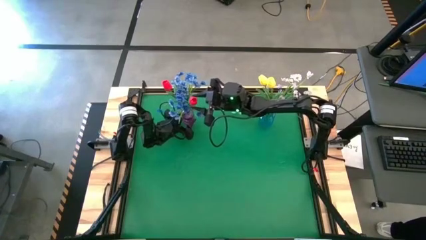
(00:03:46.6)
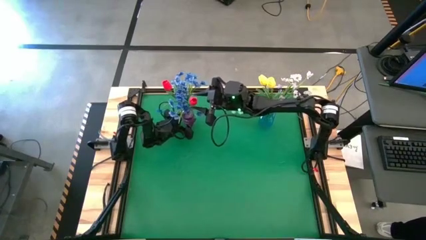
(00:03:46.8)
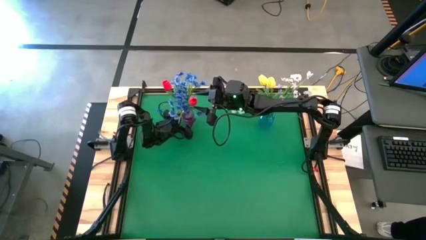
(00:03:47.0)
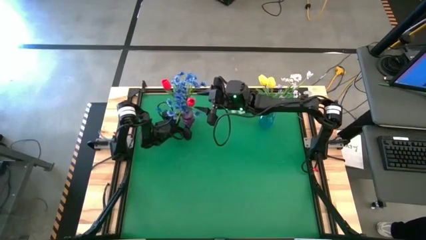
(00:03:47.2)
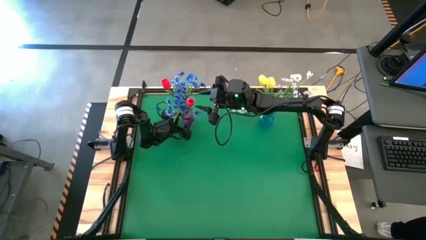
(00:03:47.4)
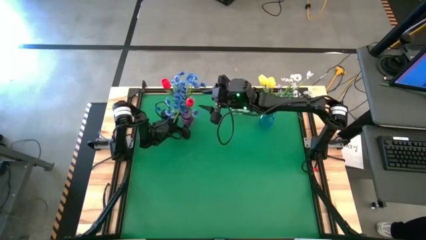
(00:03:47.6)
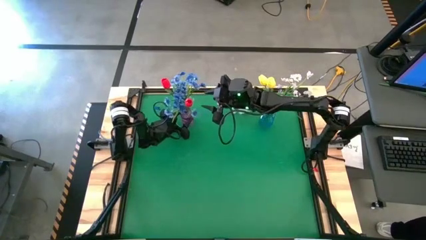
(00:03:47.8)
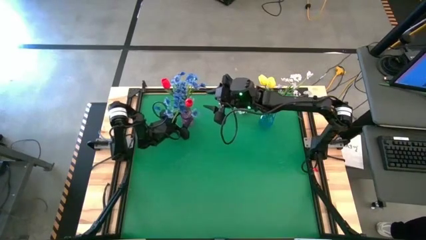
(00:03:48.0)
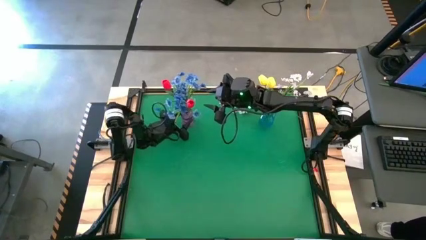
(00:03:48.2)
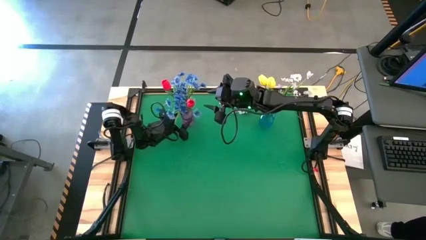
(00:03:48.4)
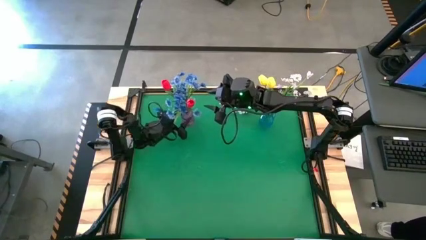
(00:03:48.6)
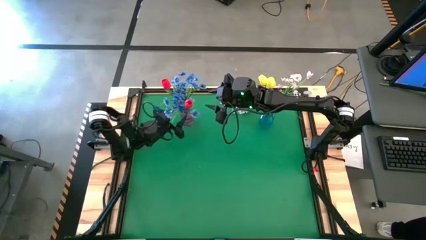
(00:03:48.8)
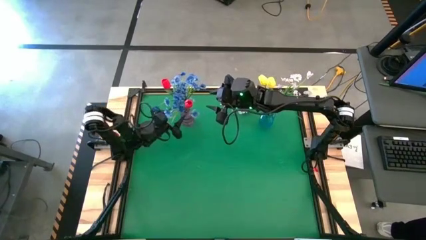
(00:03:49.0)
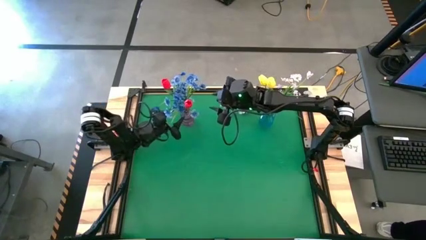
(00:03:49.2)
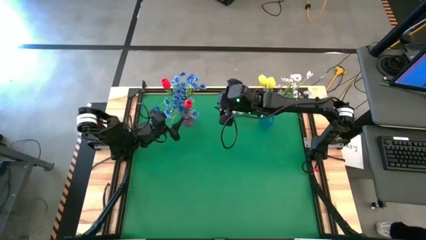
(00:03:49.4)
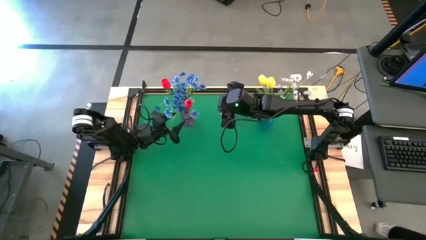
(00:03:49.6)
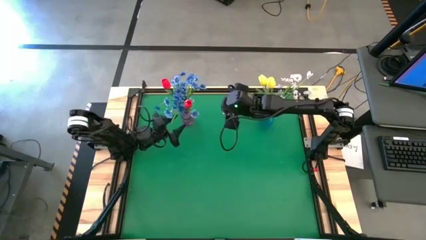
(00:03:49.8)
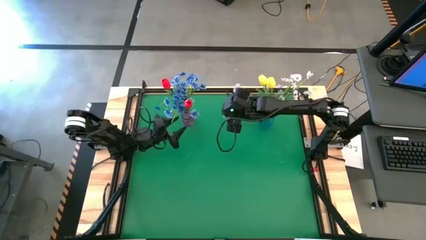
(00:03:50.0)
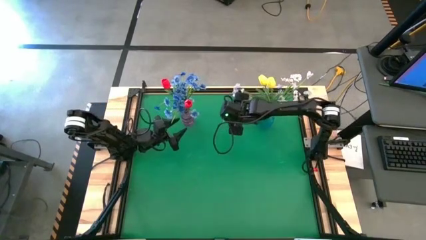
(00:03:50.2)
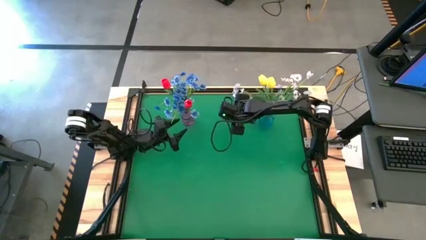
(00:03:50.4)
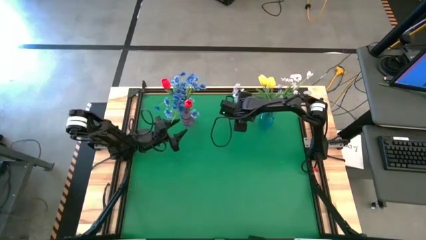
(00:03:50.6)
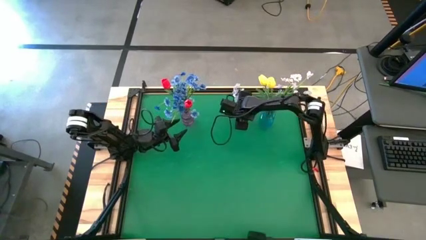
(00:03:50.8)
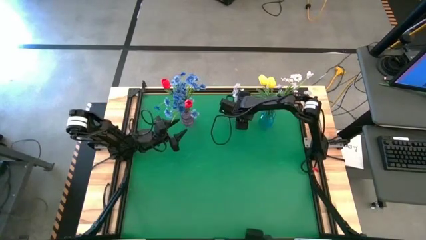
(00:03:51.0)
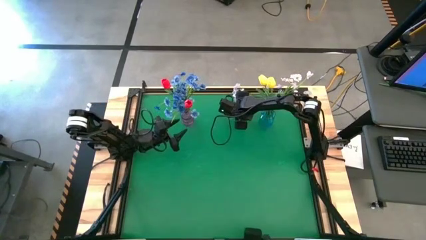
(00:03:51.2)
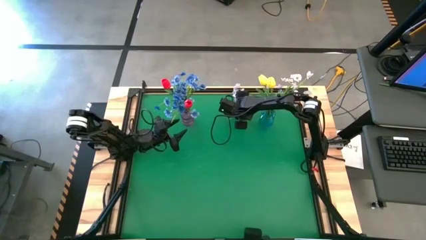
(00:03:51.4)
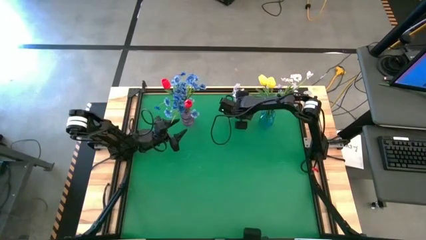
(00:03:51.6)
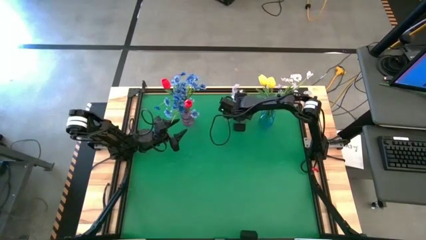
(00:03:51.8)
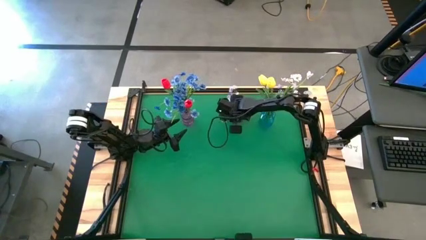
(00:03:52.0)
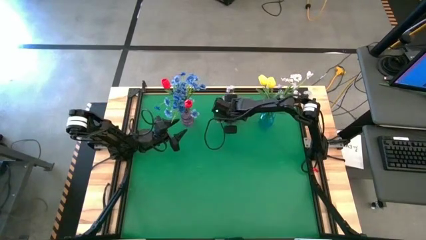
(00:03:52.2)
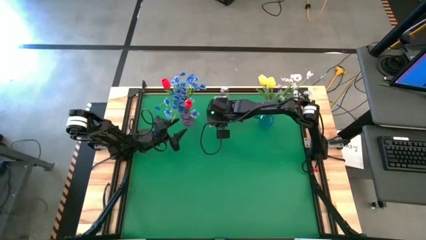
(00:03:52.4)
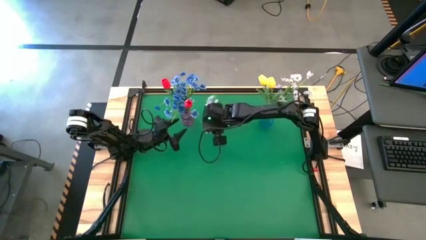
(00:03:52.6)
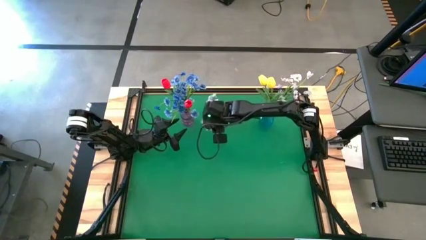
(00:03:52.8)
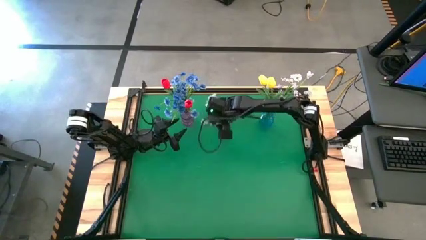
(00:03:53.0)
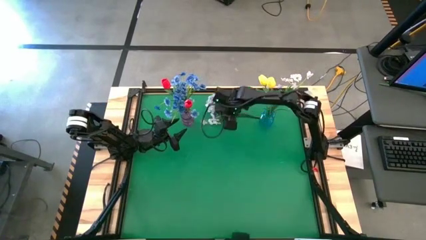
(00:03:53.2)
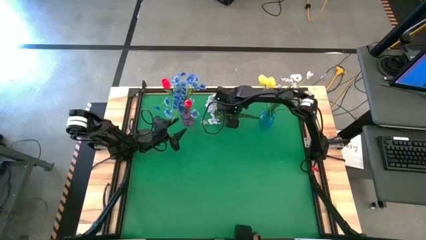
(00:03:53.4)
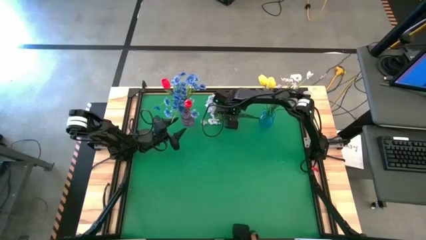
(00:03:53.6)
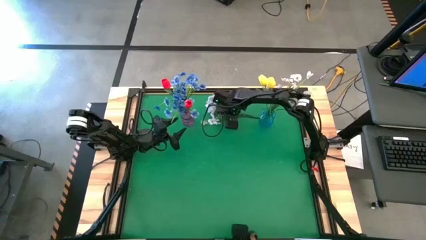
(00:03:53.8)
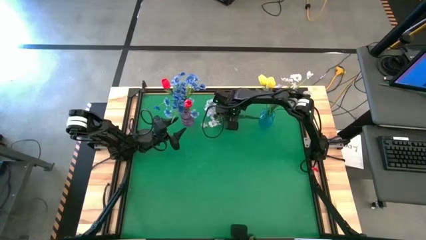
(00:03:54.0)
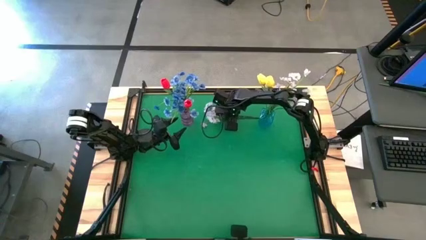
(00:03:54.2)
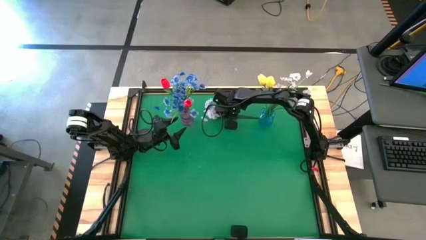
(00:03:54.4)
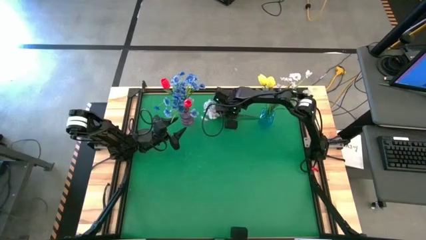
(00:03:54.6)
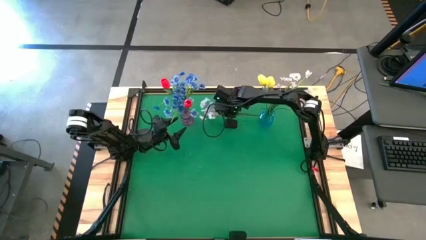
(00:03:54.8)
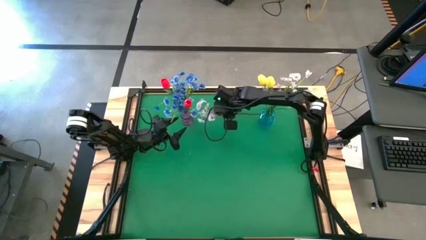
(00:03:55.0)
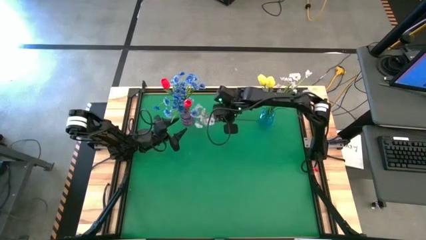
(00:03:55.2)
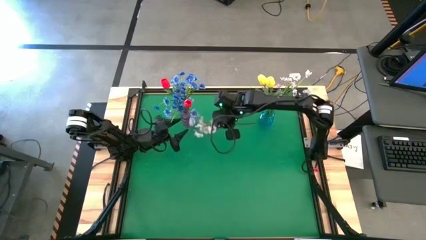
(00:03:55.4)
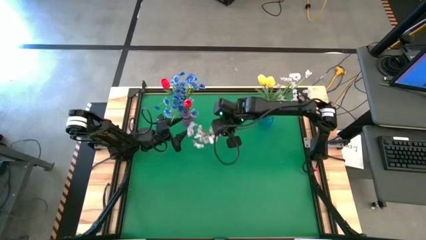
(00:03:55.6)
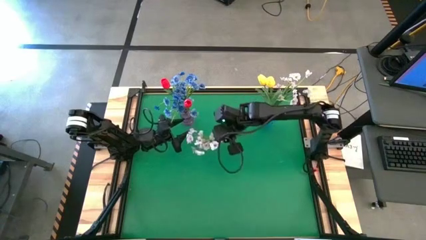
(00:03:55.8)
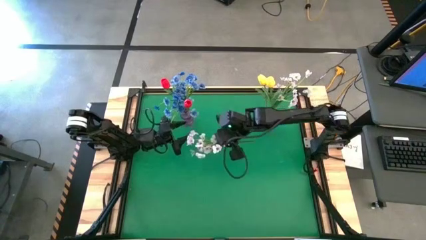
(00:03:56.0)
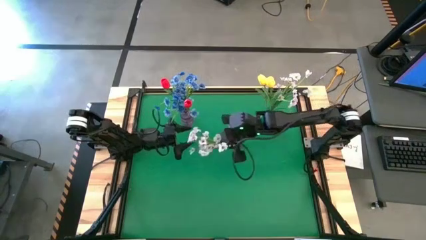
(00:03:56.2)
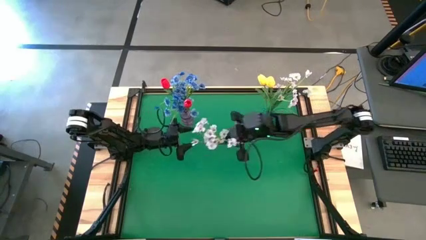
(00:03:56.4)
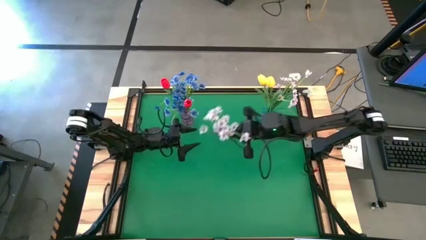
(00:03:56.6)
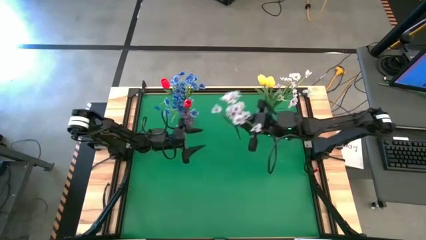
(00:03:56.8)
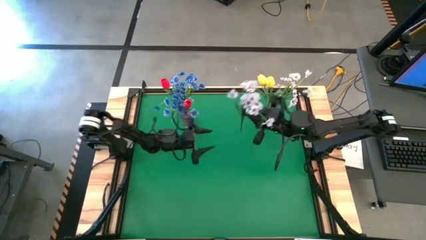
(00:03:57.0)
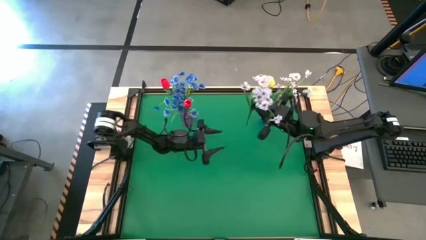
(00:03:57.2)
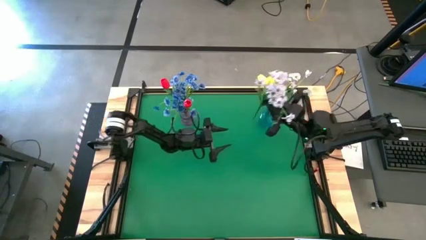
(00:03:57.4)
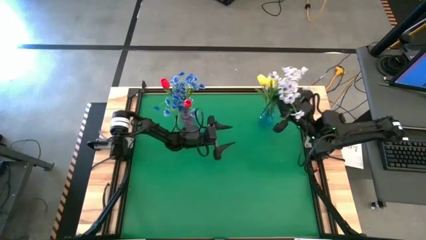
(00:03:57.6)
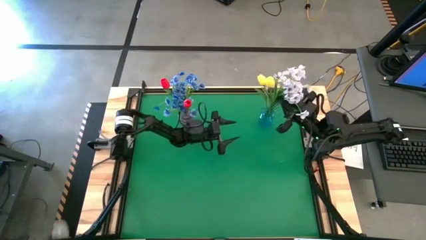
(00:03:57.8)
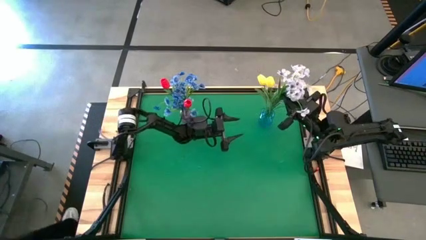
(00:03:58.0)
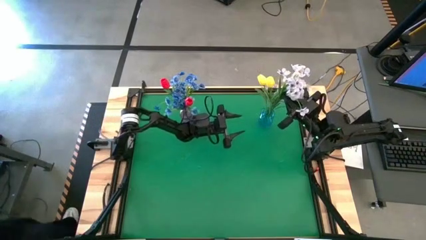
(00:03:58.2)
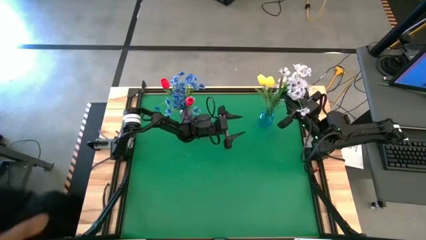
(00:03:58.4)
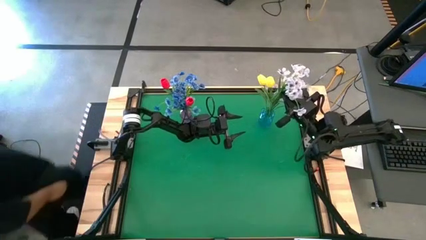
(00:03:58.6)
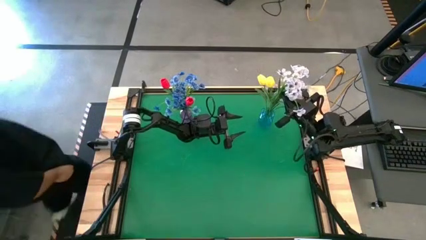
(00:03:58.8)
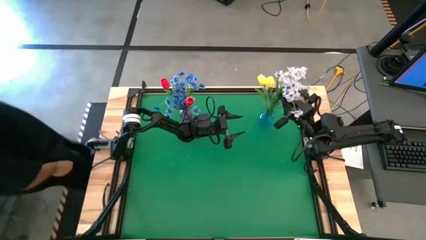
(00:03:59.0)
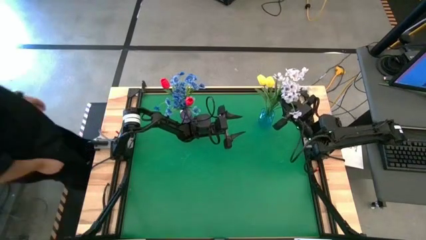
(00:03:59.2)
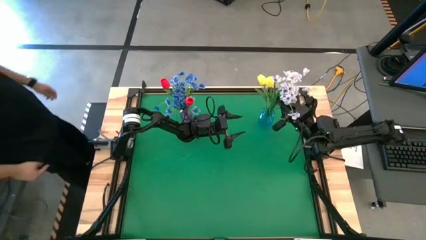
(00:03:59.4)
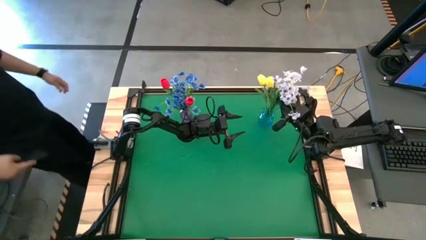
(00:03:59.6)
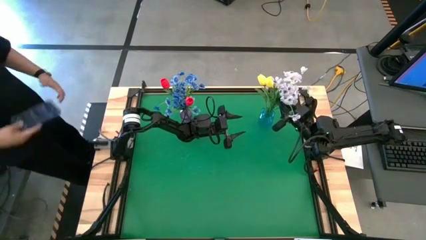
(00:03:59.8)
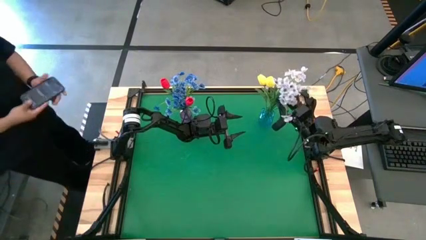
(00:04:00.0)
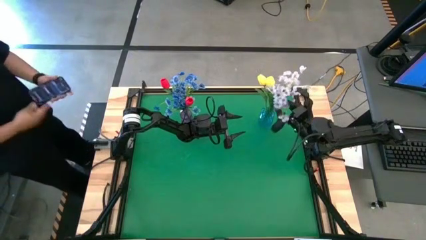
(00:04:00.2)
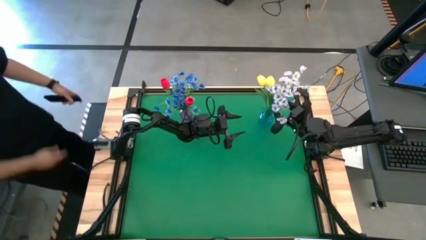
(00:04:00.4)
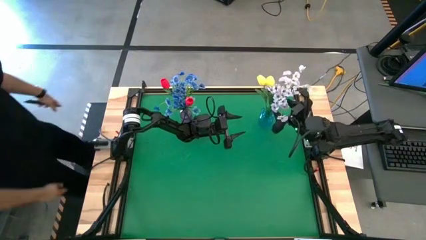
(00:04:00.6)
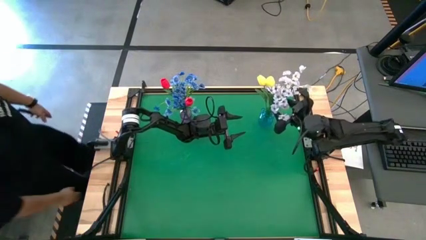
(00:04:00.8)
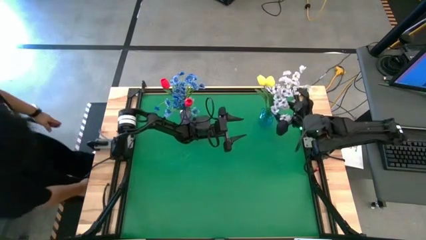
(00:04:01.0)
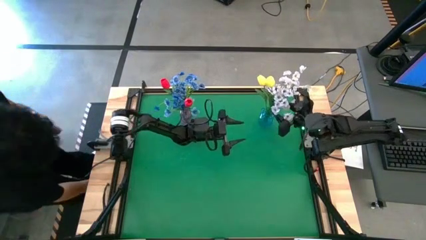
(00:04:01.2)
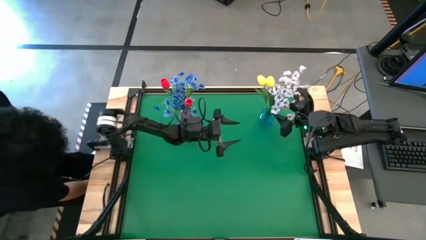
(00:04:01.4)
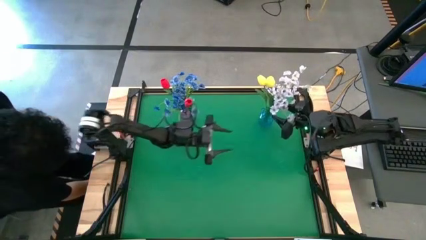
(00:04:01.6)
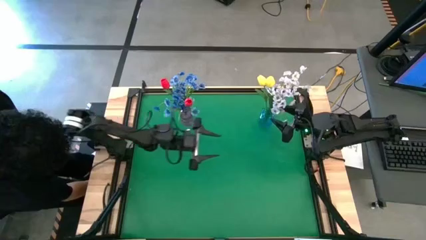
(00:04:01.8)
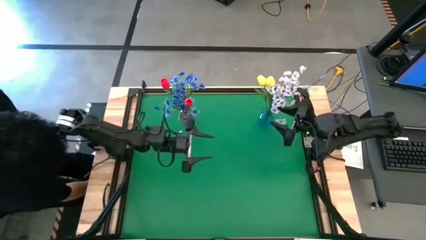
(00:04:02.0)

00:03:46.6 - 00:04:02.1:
Task: Sort flowers into vase by color
Put the white flowers into the blue vase

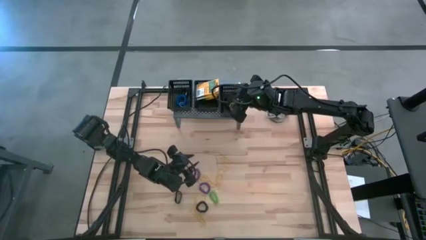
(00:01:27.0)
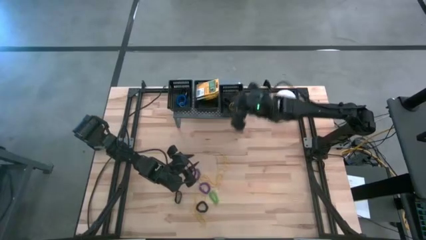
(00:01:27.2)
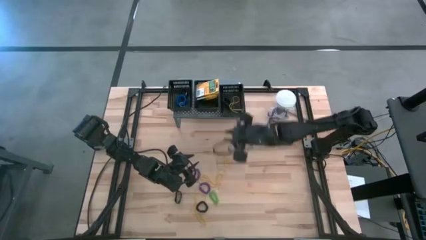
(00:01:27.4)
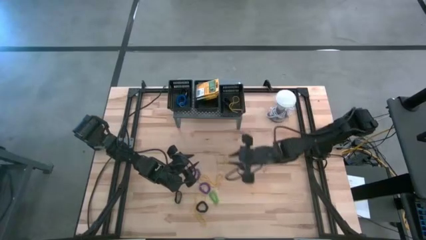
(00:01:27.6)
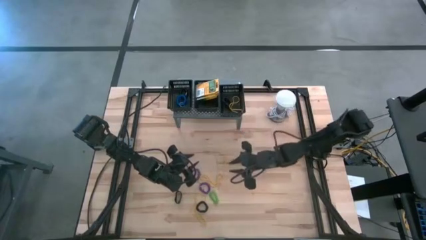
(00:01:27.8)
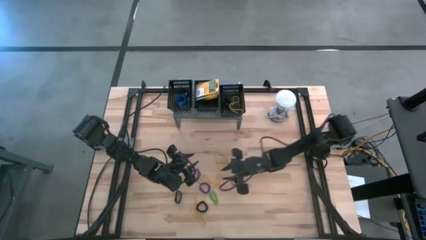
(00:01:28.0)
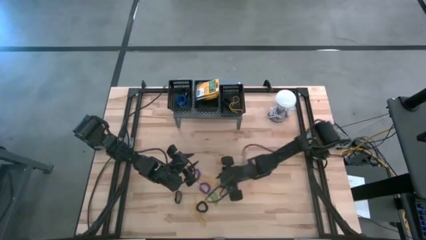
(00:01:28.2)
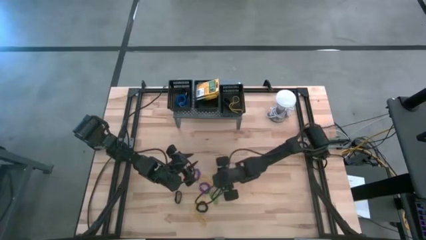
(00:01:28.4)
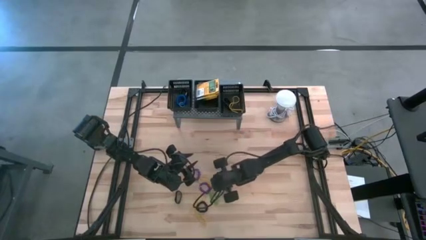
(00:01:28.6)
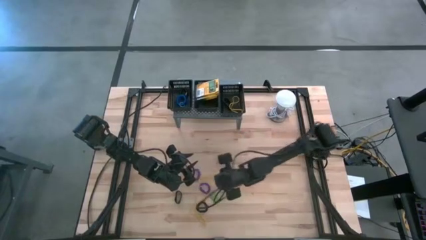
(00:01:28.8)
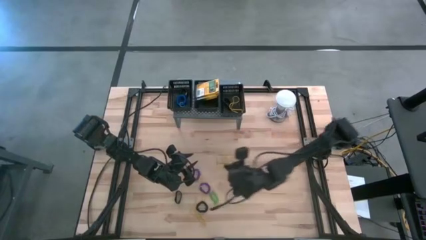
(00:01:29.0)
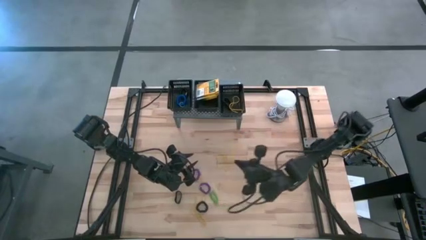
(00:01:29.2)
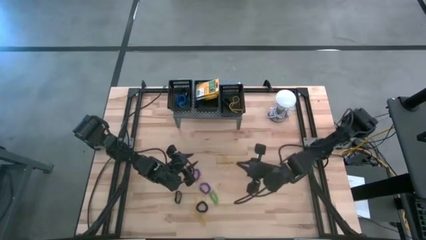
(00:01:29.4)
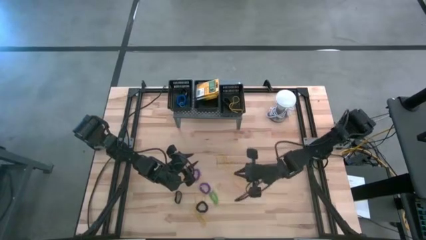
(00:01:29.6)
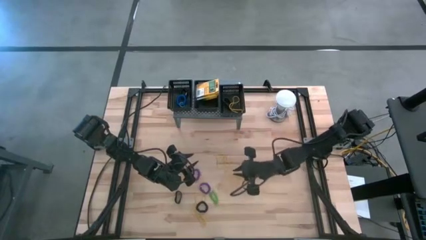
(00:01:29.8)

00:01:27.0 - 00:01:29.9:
Task: Pick & Place Office Desk Supplies
Put the yellow rubber band into the right black bin on the shelf
